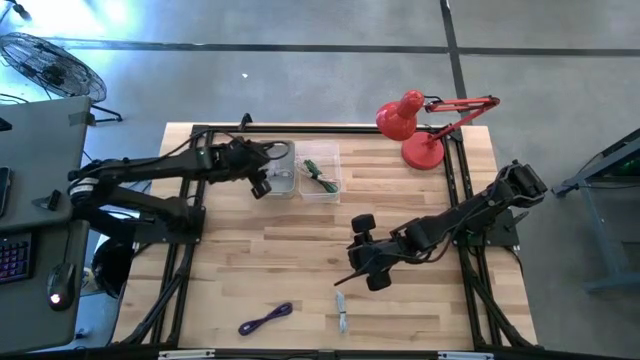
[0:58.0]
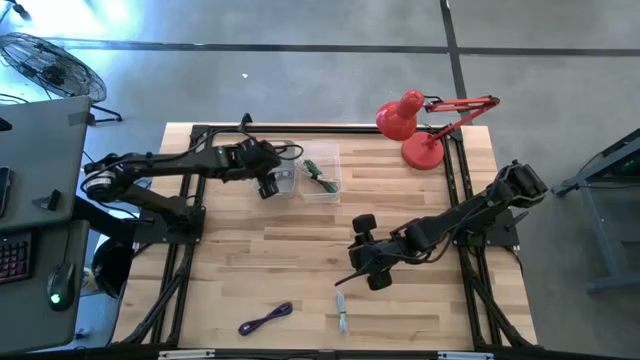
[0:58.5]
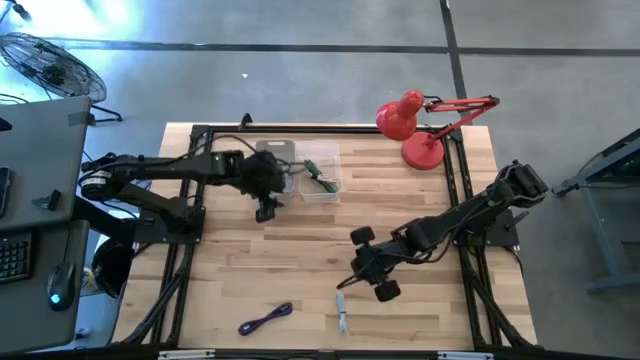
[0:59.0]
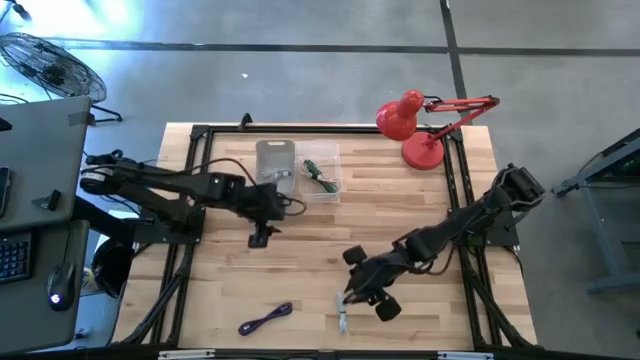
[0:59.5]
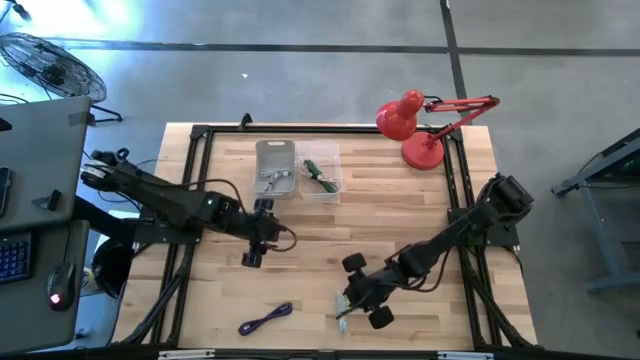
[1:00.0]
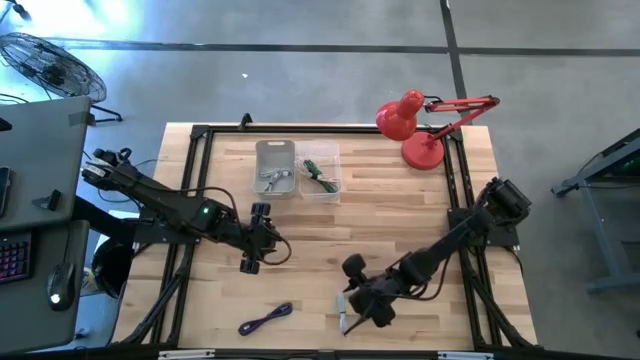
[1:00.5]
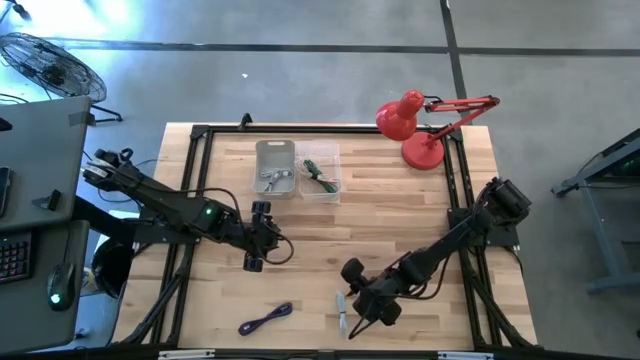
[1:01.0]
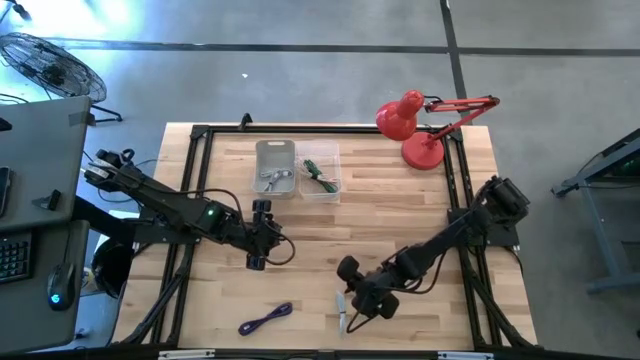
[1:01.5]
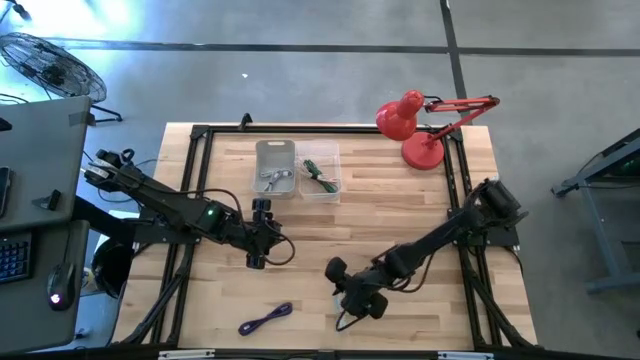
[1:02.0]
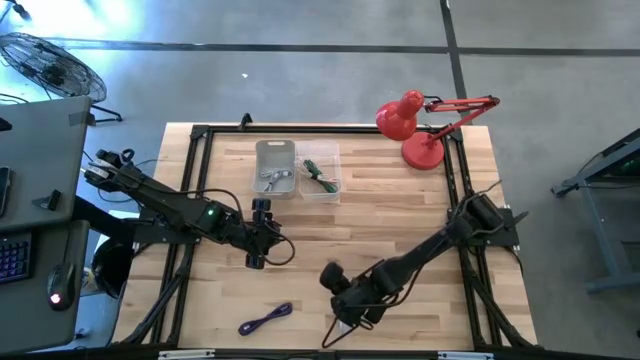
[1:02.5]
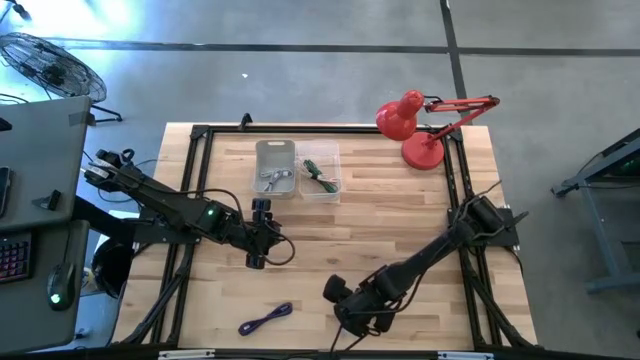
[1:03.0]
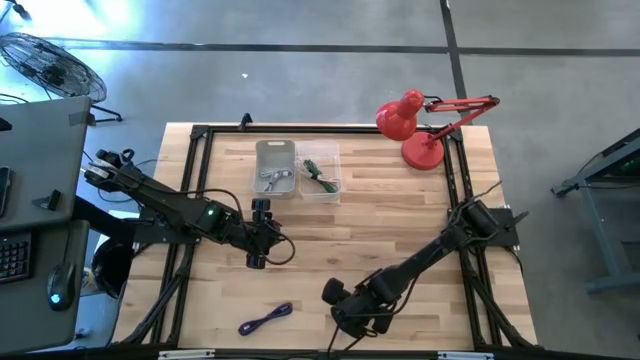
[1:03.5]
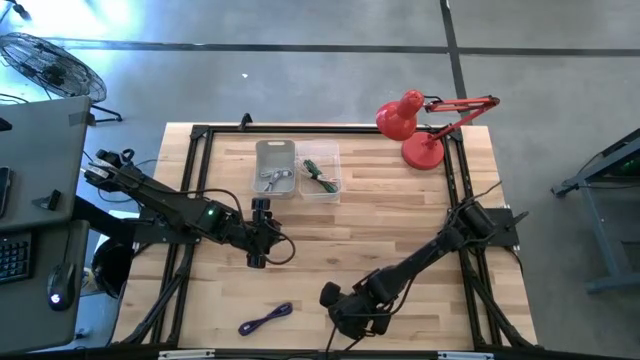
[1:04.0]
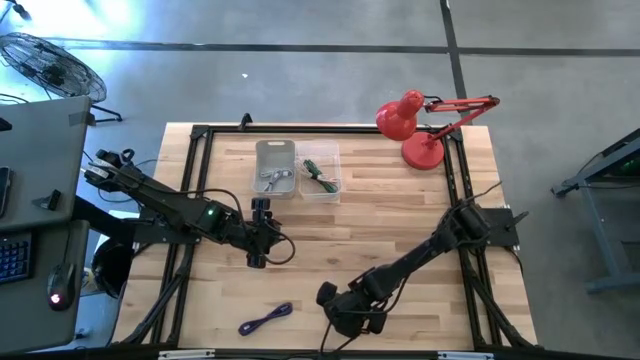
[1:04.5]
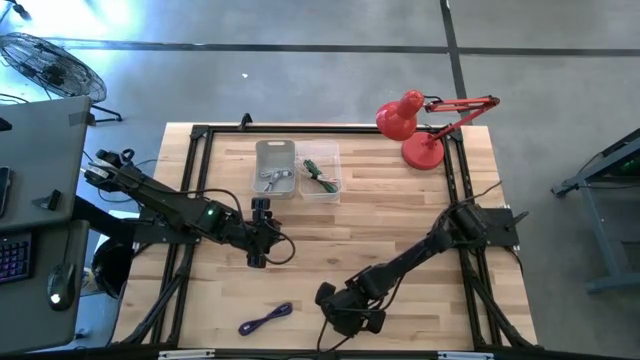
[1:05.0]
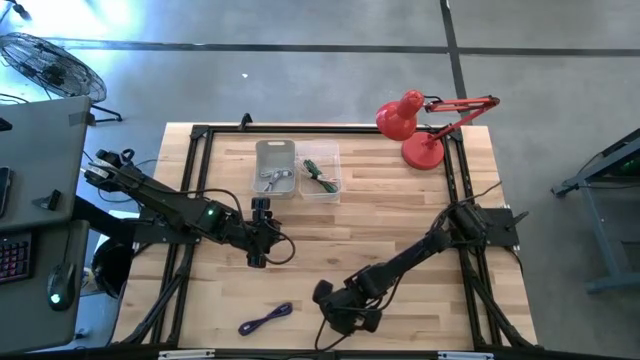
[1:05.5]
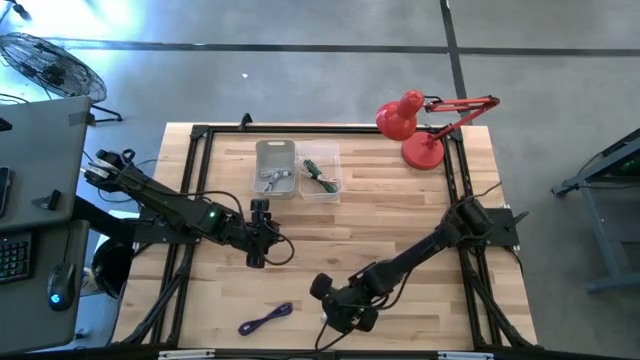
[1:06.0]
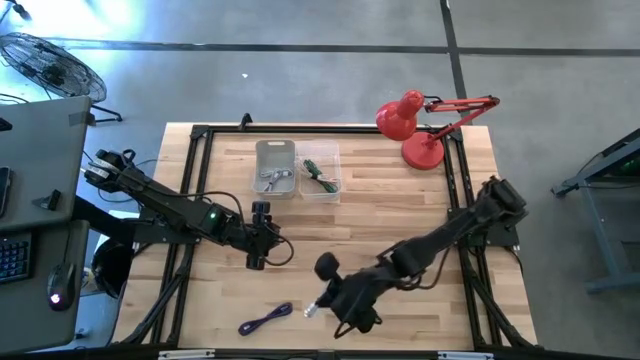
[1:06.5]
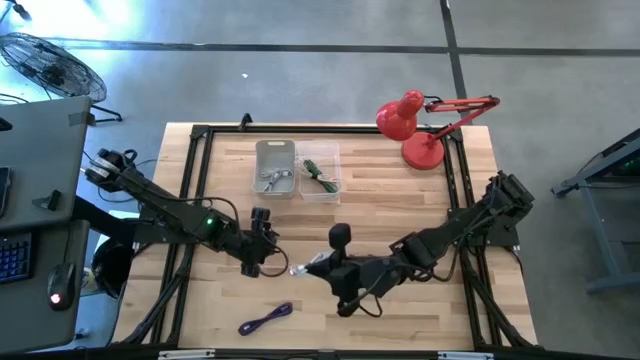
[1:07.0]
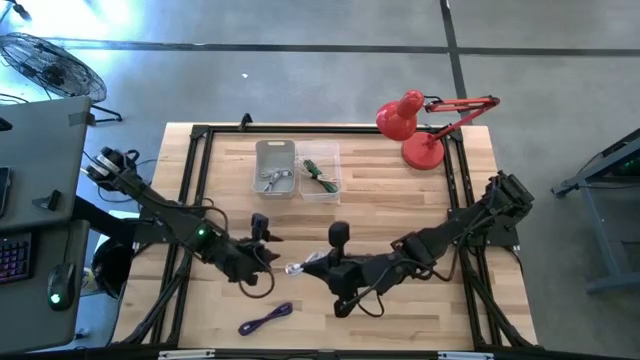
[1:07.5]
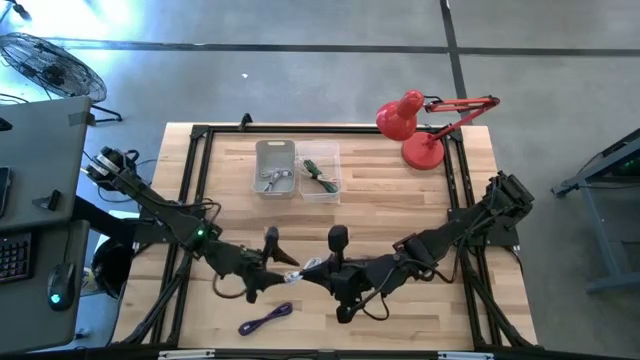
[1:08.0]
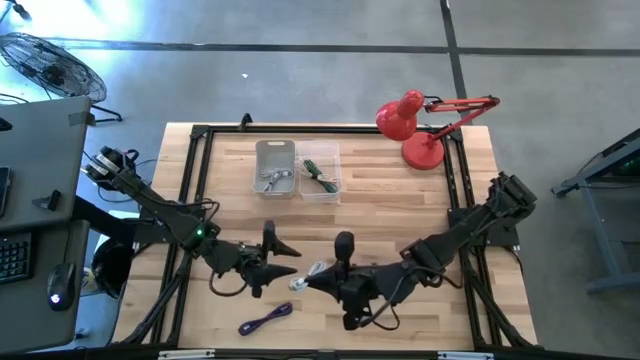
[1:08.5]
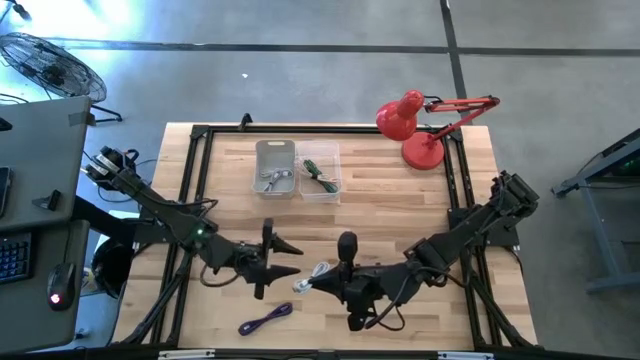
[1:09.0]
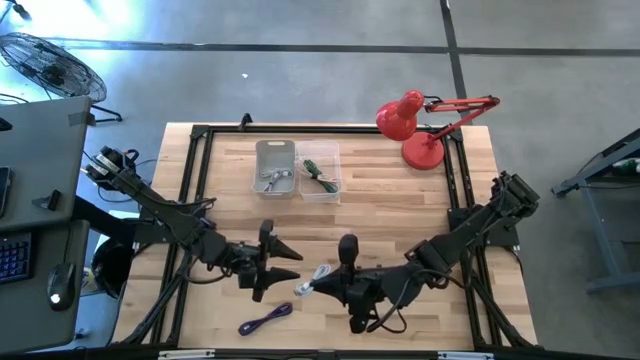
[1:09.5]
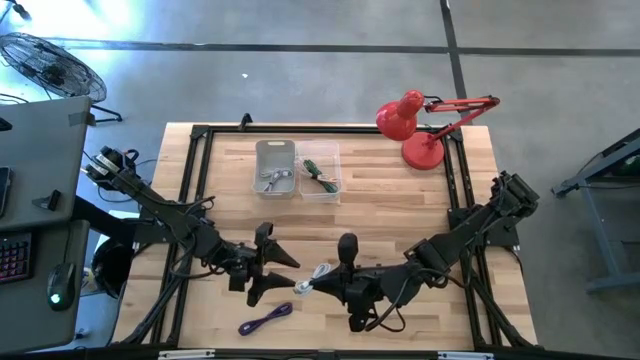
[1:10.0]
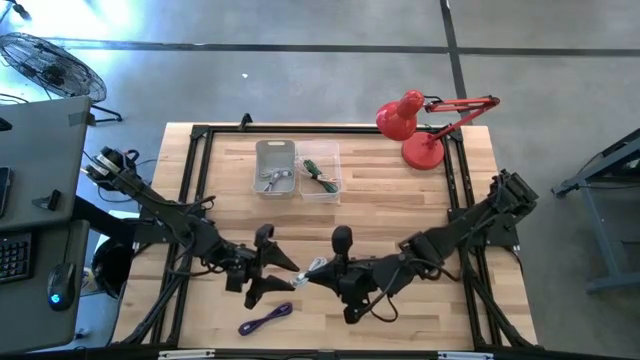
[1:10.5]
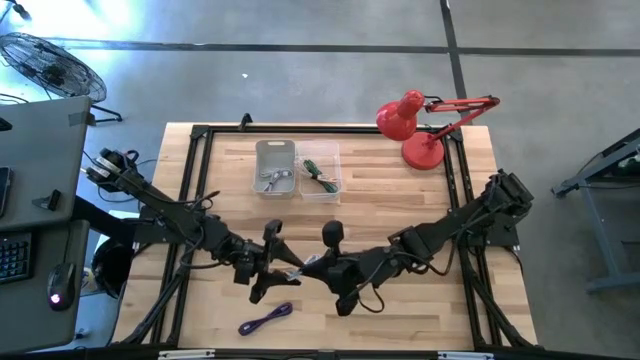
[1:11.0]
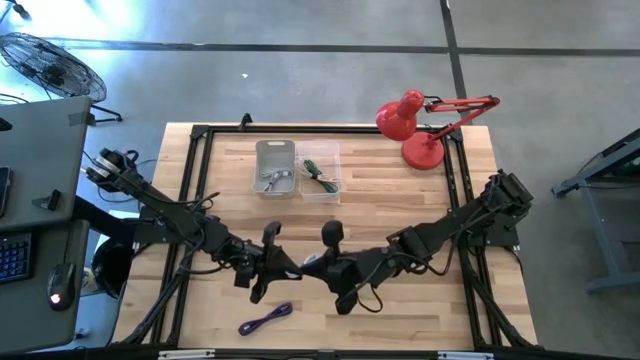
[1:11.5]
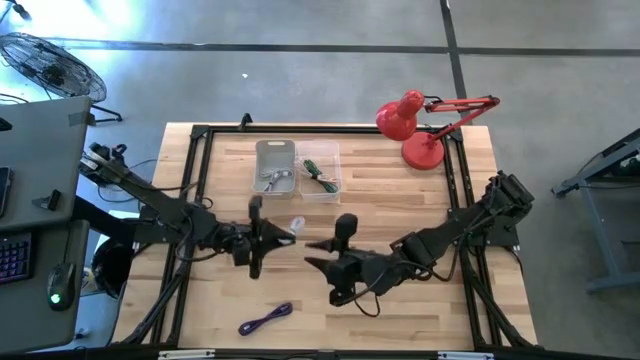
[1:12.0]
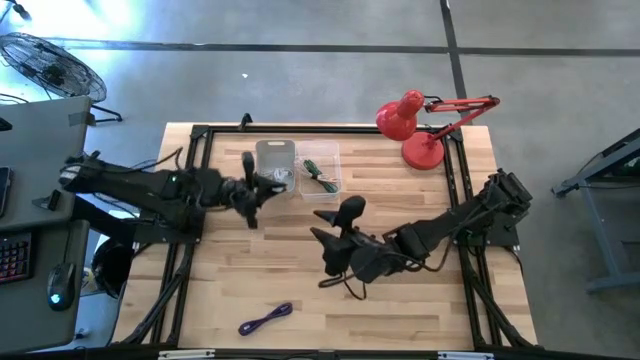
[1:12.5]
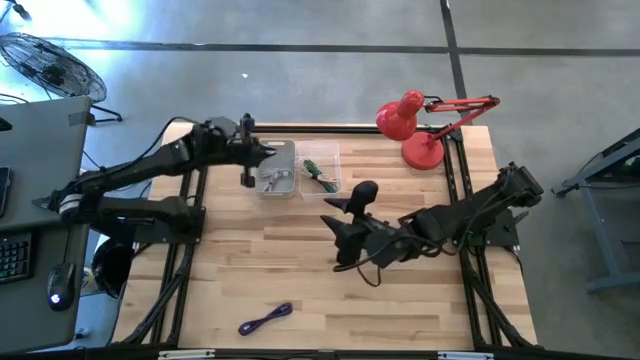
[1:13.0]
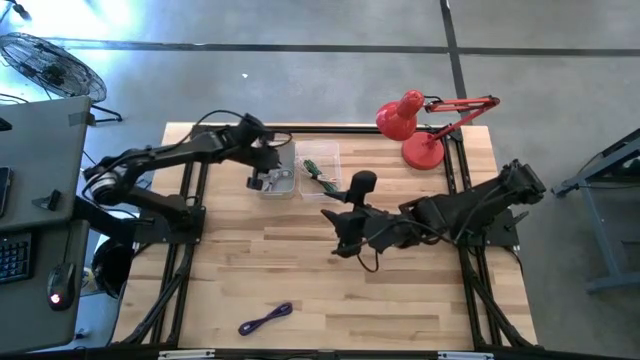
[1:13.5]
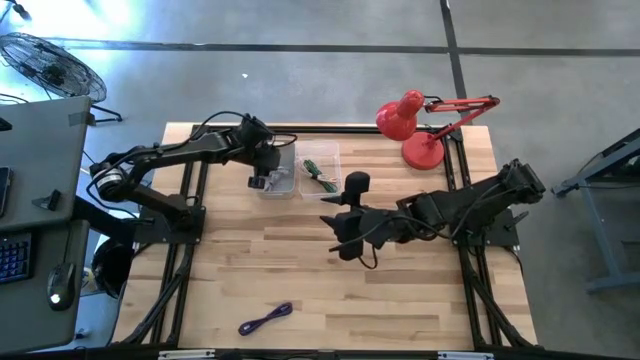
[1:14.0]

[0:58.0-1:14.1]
Task: Pick & Place USB Port
Put the white charger cable into the grey bin
